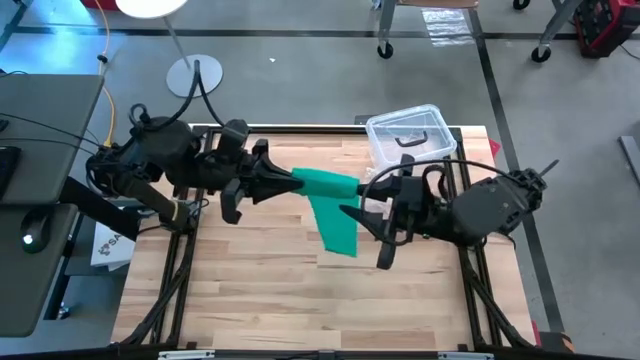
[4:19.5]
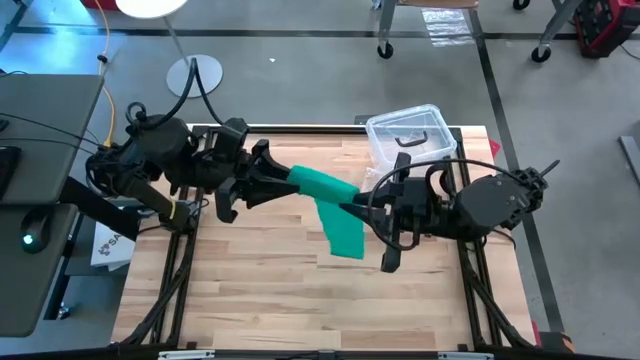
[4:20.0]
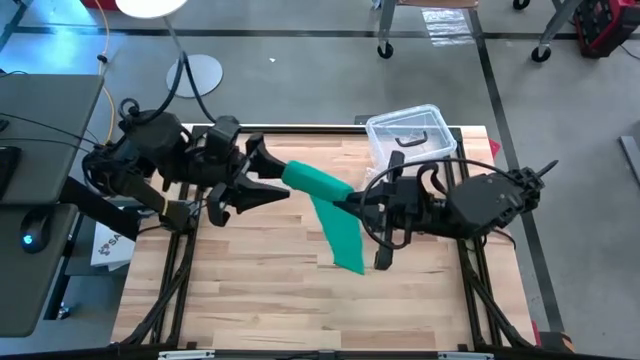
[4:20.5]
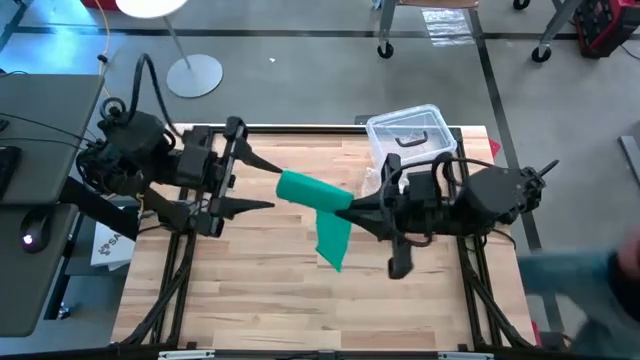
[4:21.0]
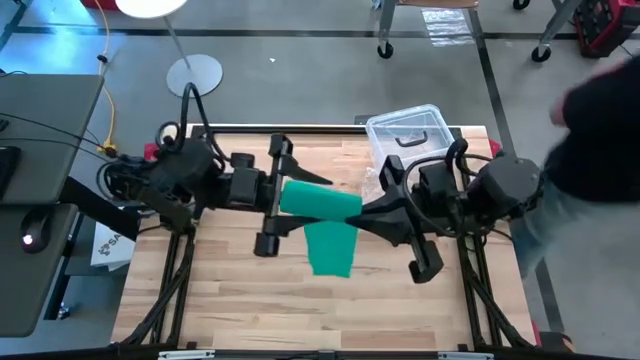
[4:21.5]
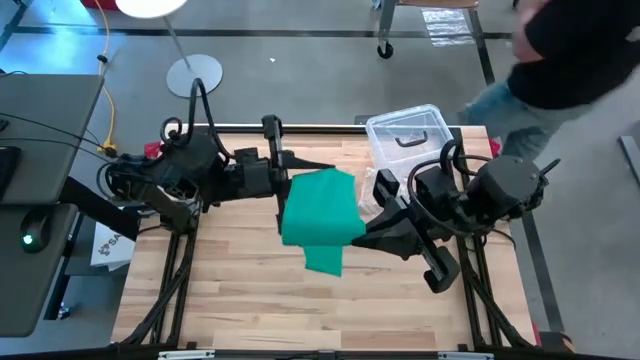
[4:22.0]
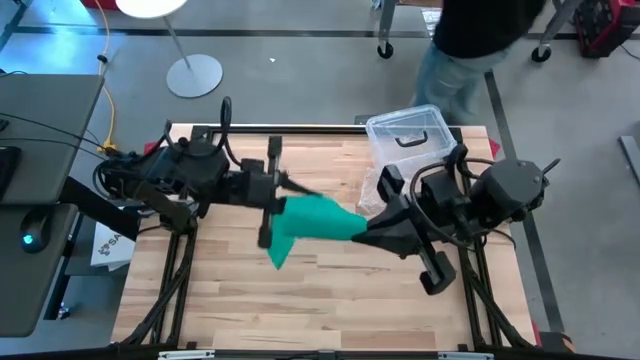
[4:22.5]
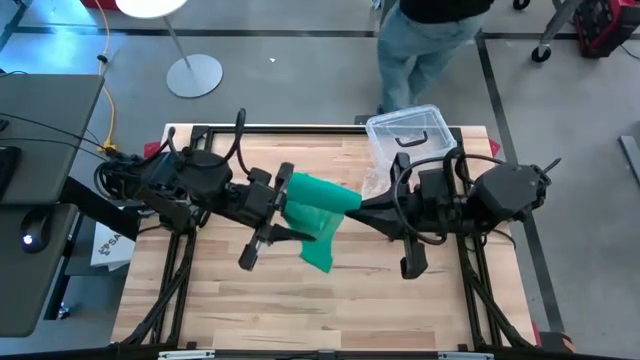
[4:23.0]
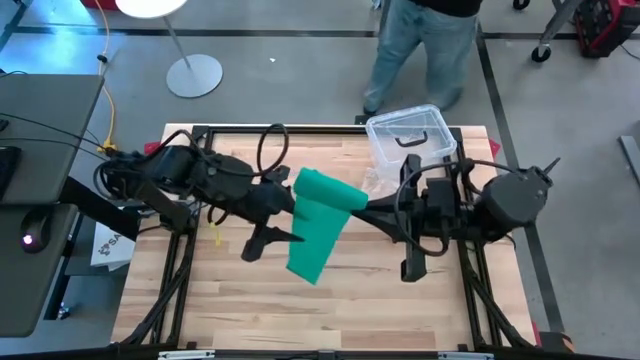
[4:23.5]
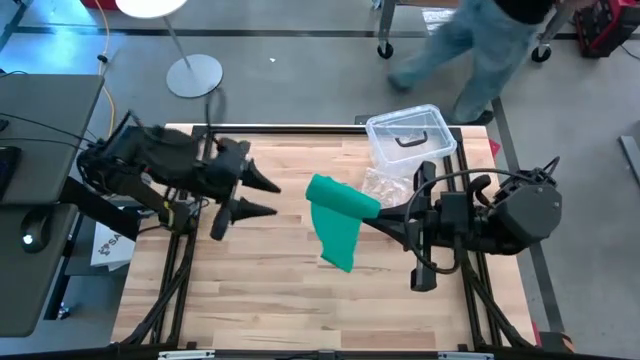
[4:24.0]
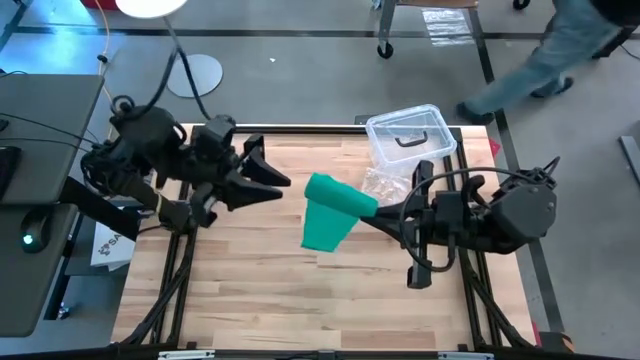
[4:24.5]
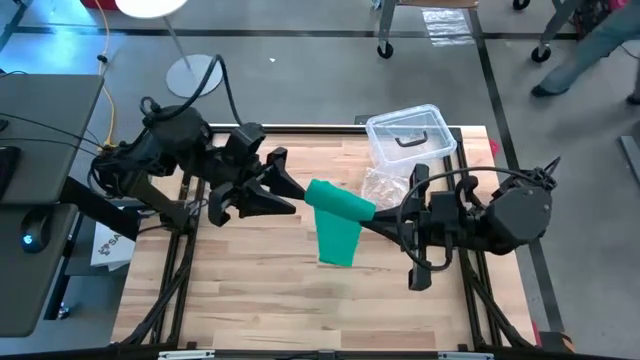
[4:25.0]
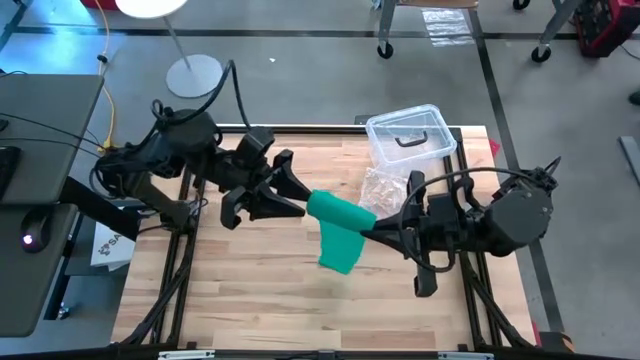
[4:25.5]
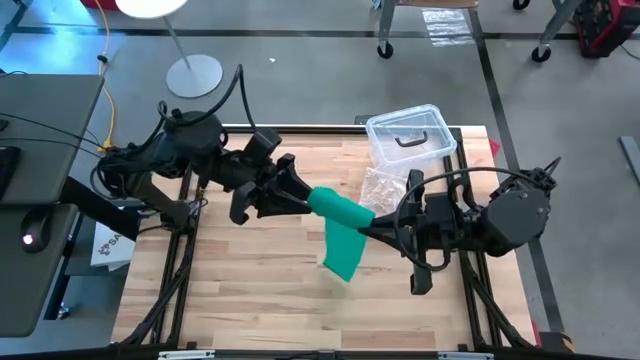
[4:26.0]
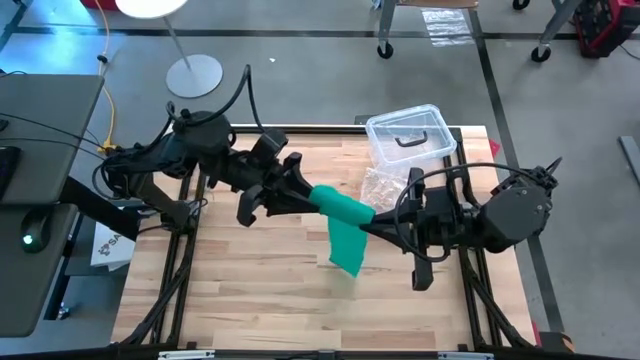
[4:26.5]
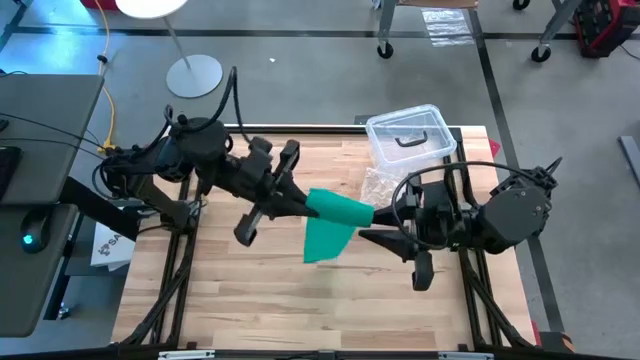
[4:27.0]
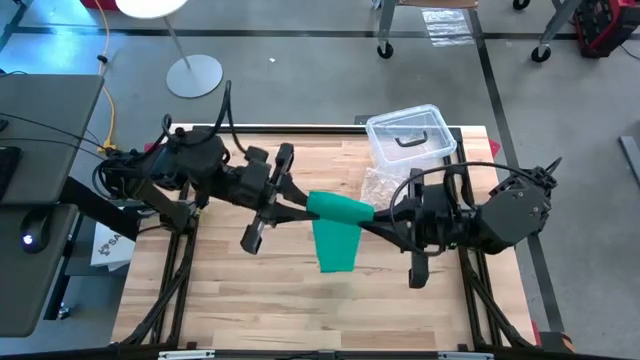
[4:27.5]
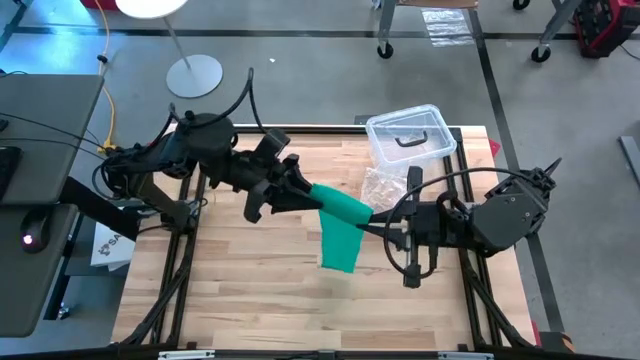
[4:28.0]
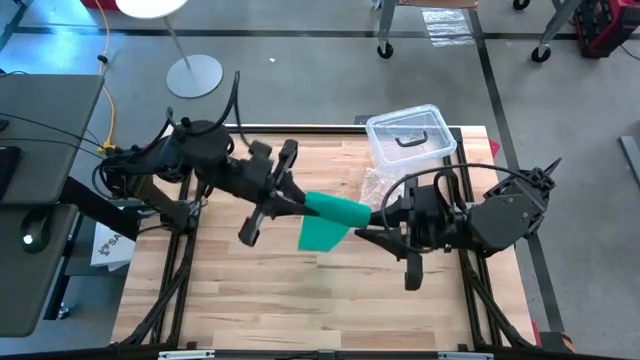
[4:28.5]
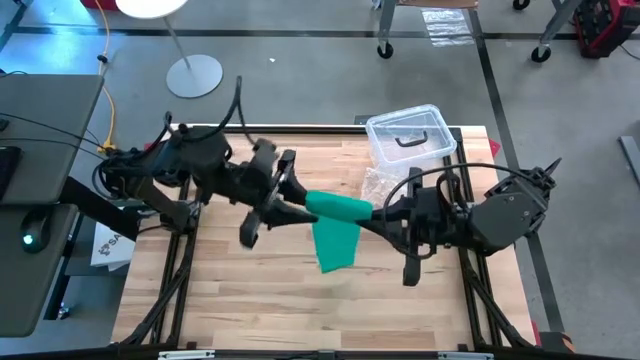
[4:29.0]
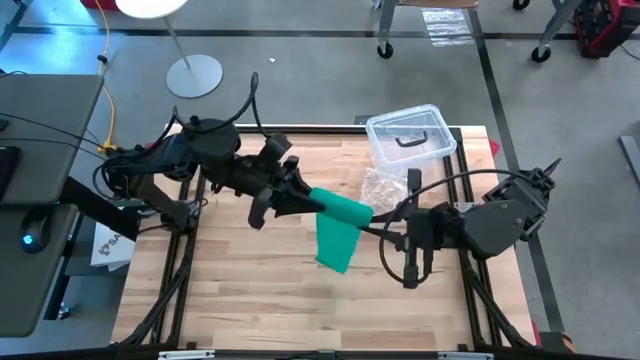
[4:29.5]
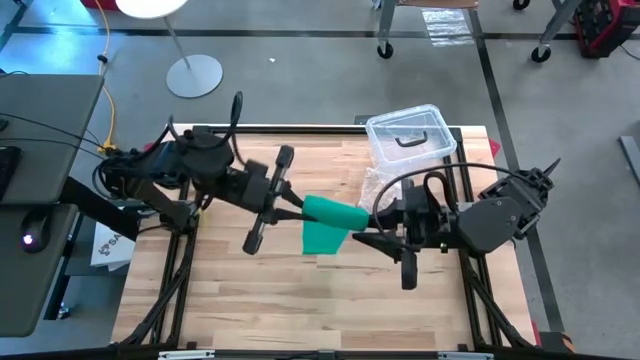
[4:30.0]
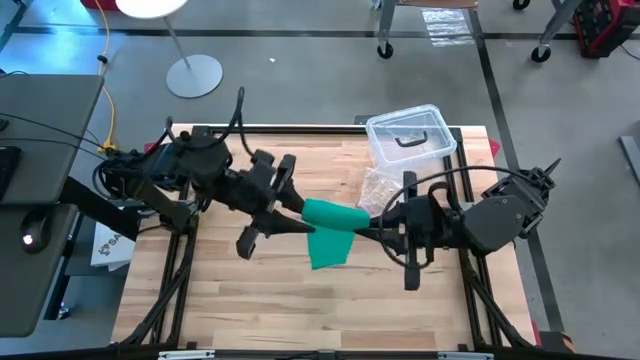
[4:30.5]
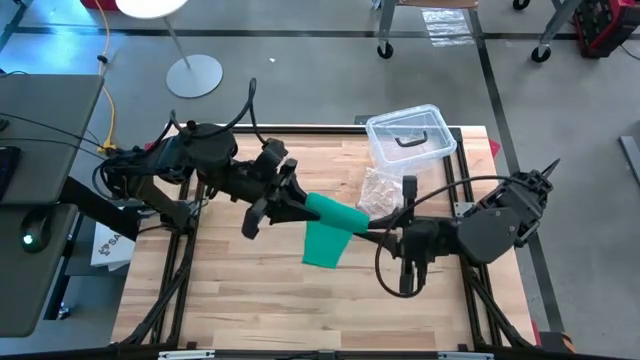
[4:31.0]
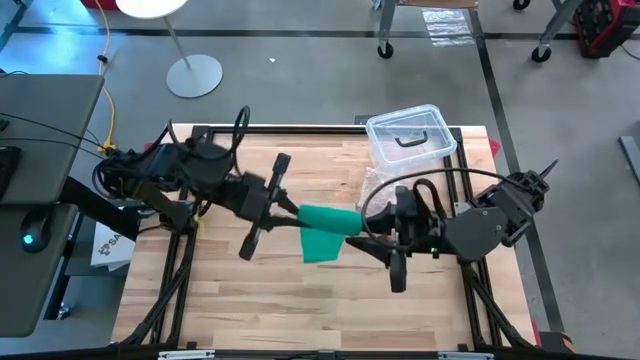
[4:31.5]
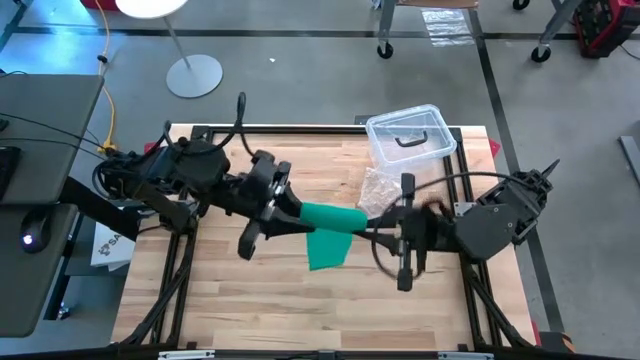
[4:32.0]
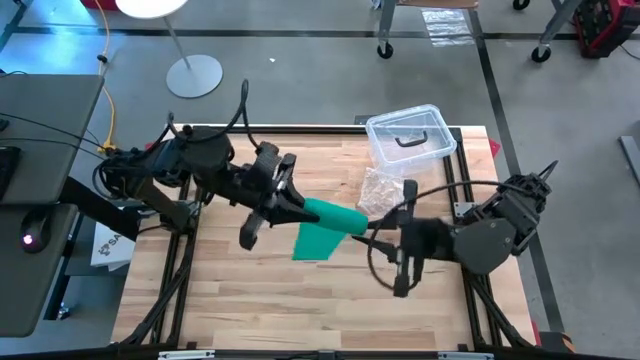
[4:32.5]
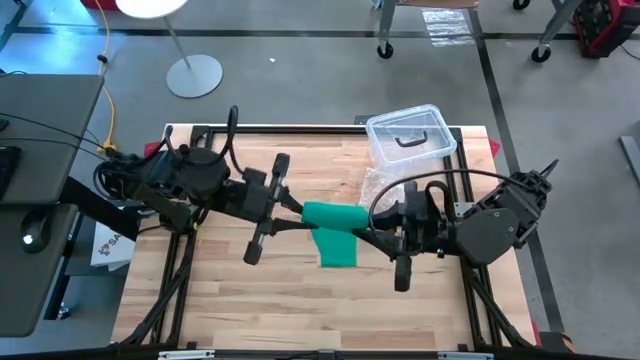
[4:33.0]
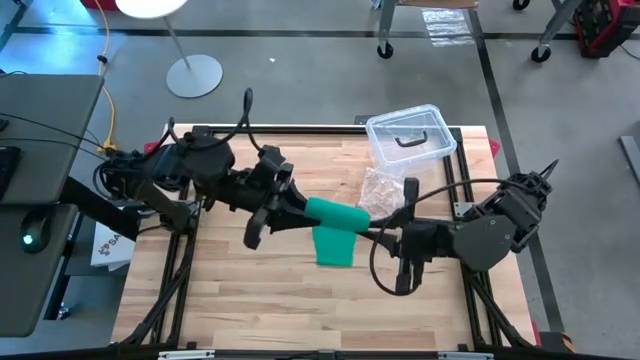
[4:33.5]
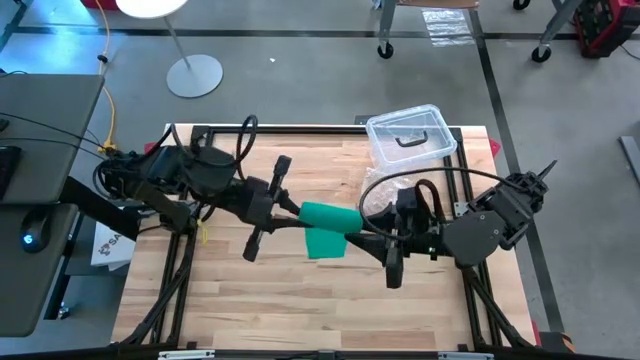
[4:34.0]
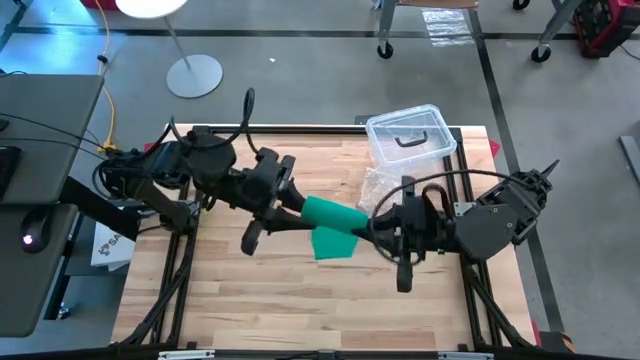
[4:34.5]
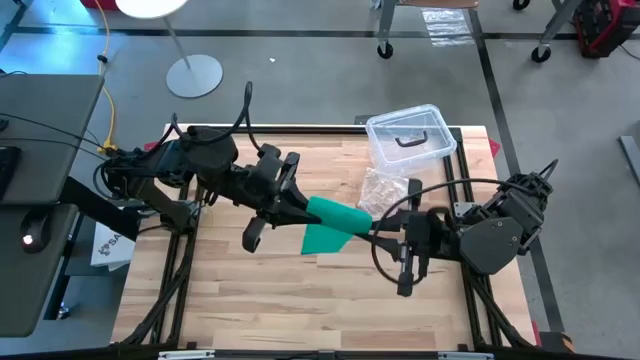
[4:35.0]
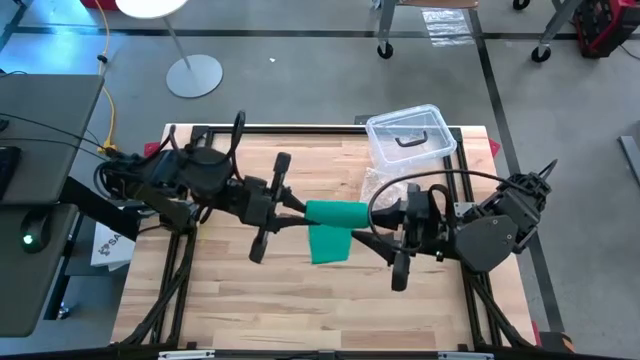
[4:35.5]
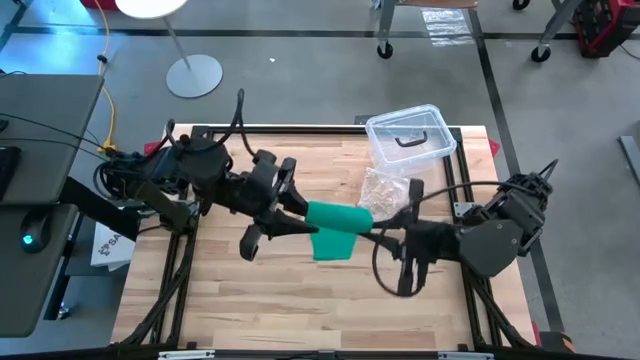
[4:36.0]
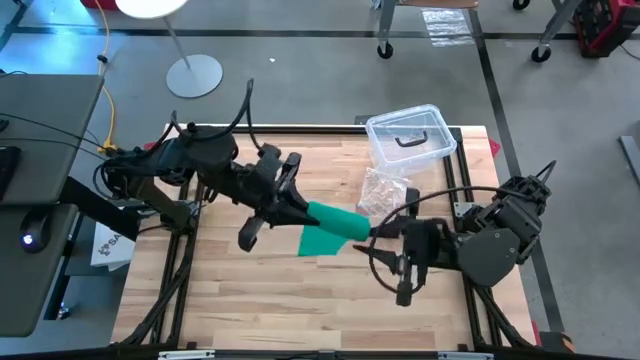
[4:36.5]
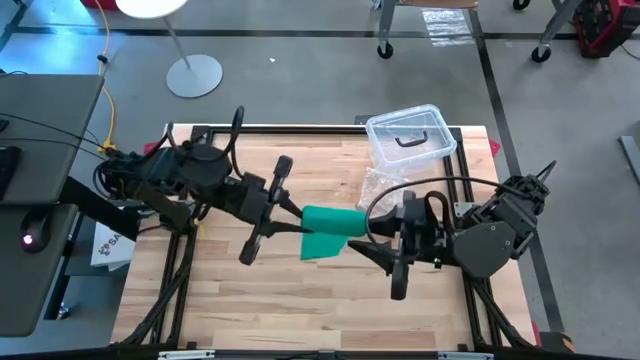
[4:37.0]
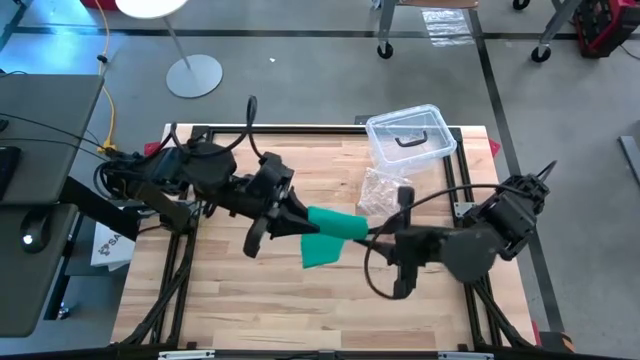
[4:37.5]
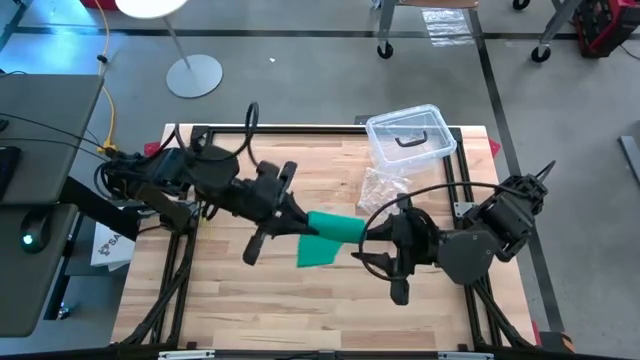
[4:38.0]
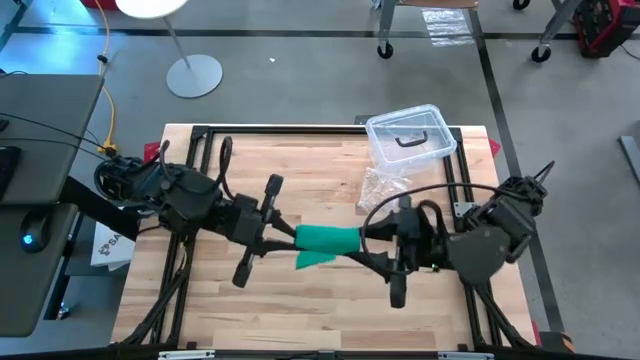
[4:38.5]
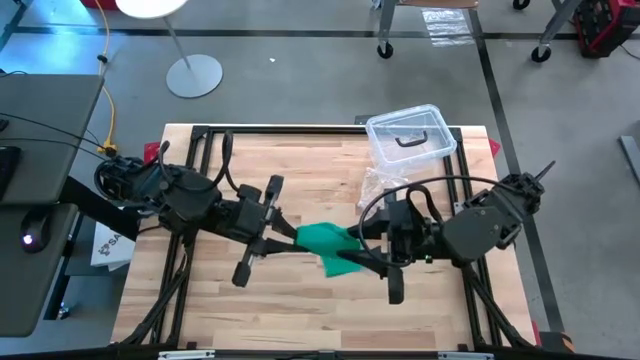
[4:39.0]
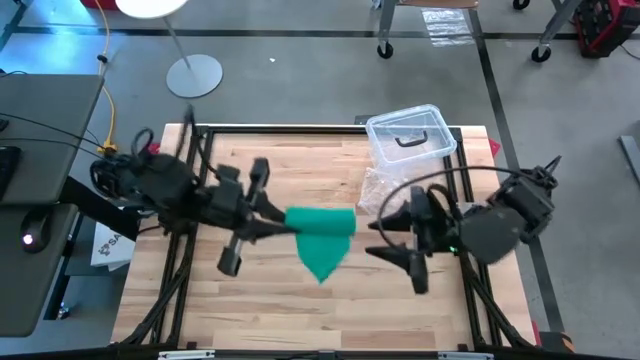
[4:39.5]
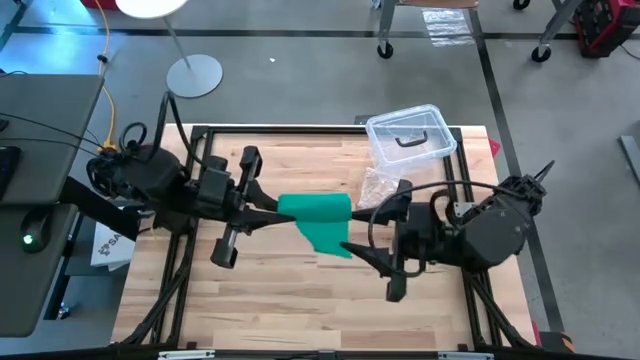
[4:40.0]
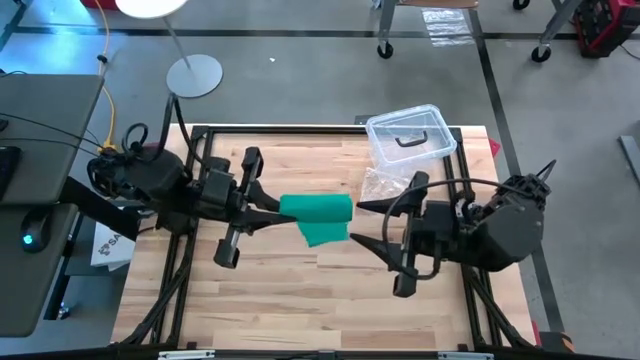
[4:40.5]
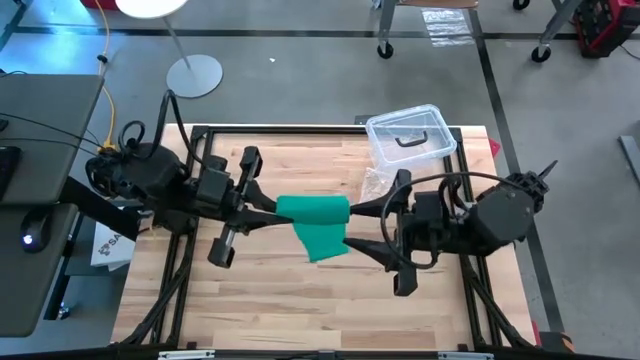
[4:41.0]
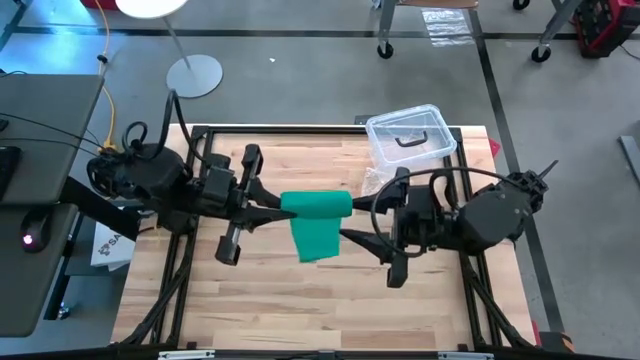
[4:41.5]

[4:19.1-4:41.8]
Task: Roll bandage
Roll the green bandage
